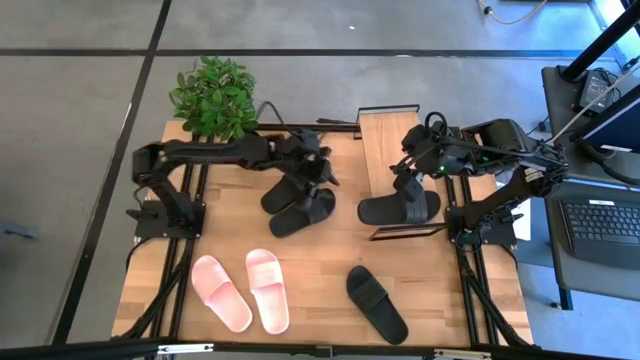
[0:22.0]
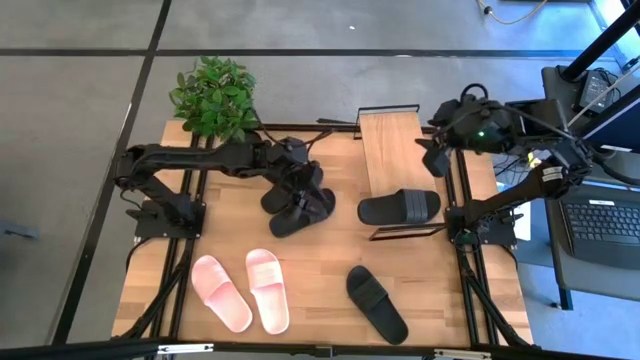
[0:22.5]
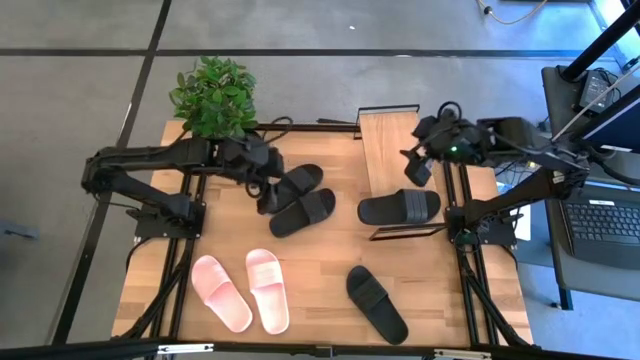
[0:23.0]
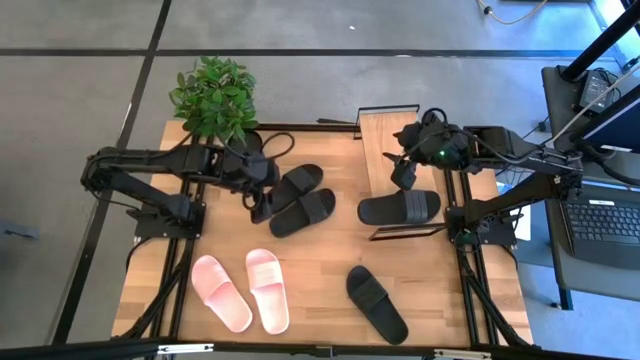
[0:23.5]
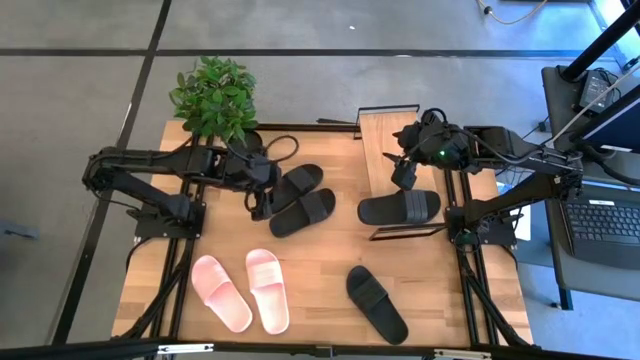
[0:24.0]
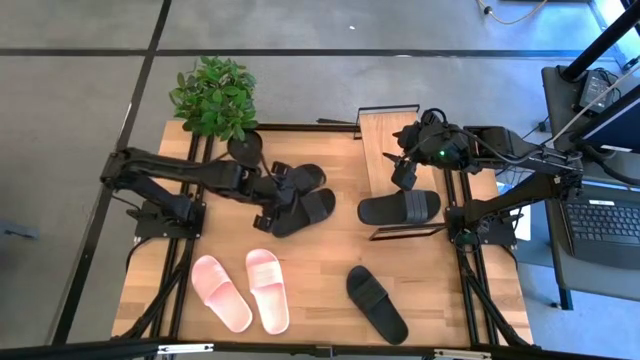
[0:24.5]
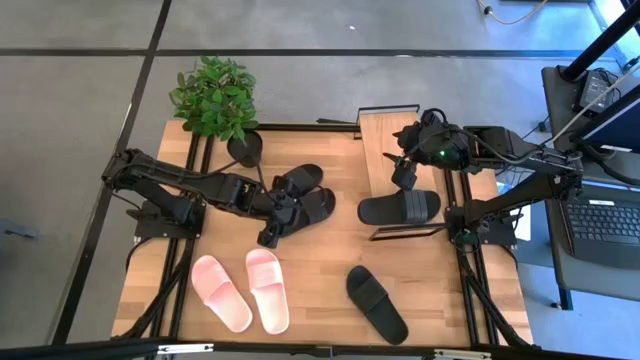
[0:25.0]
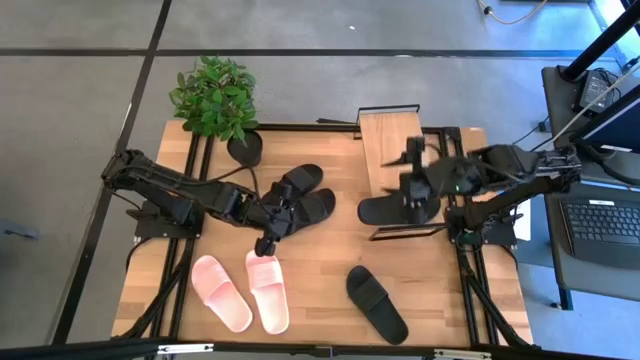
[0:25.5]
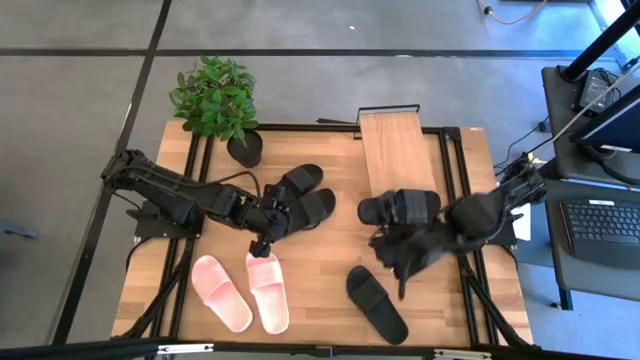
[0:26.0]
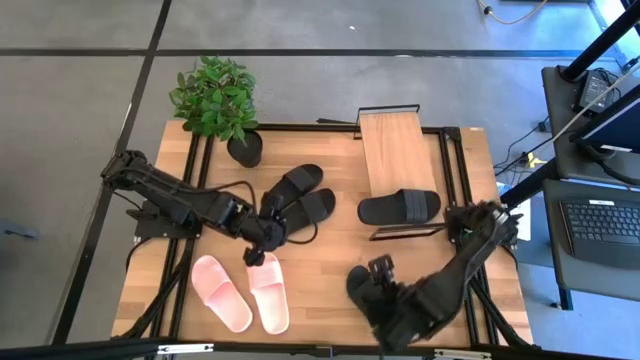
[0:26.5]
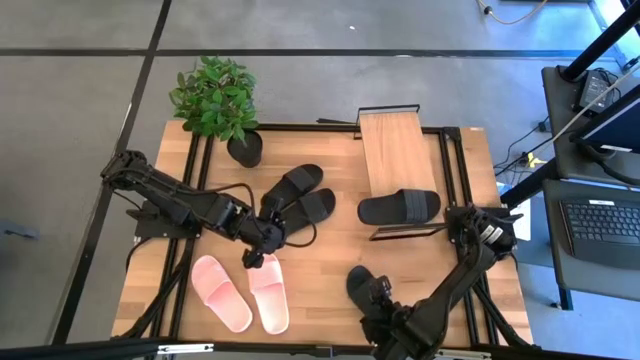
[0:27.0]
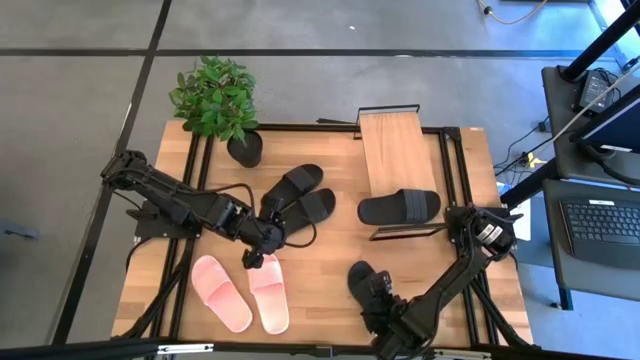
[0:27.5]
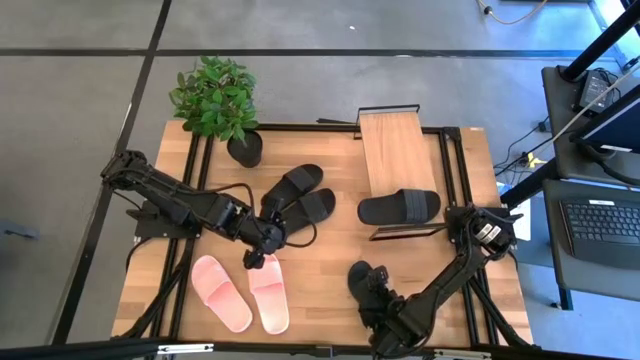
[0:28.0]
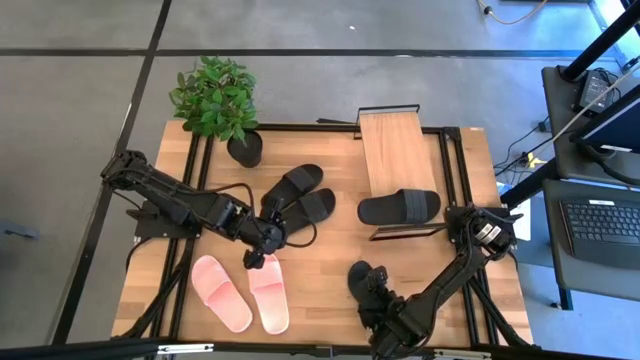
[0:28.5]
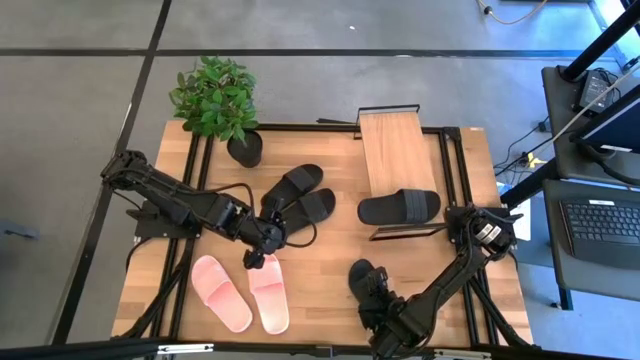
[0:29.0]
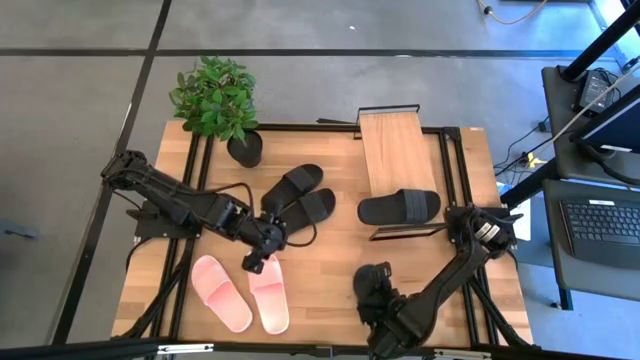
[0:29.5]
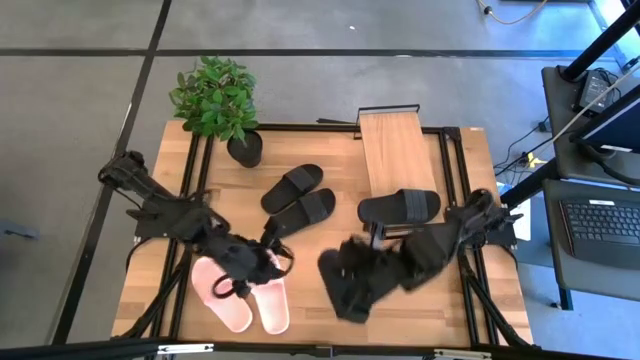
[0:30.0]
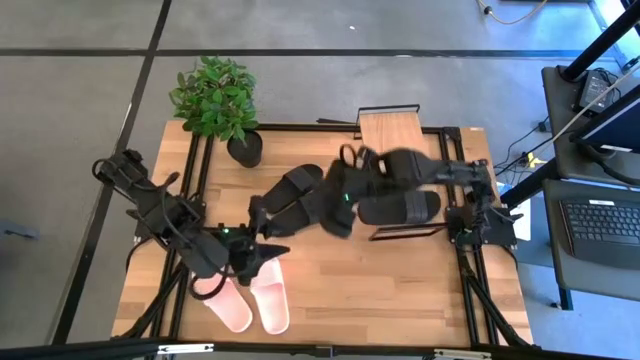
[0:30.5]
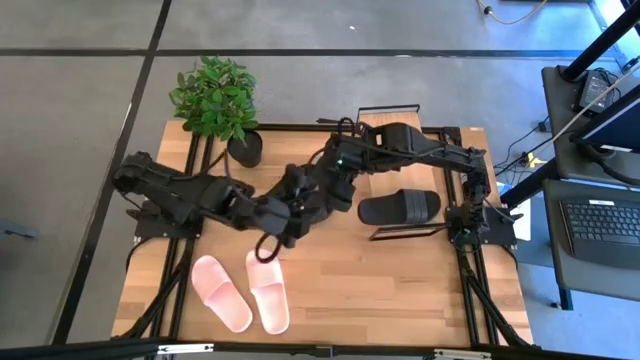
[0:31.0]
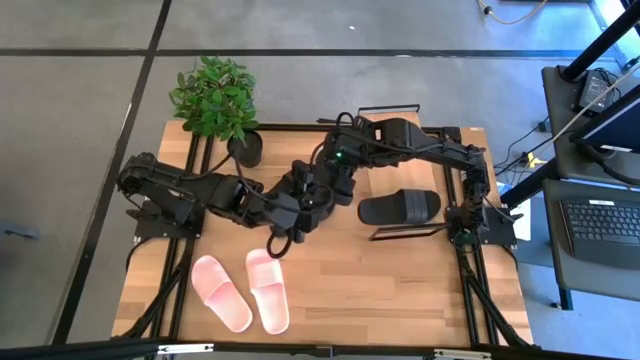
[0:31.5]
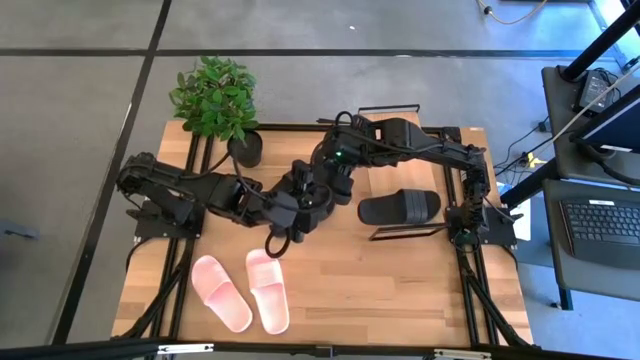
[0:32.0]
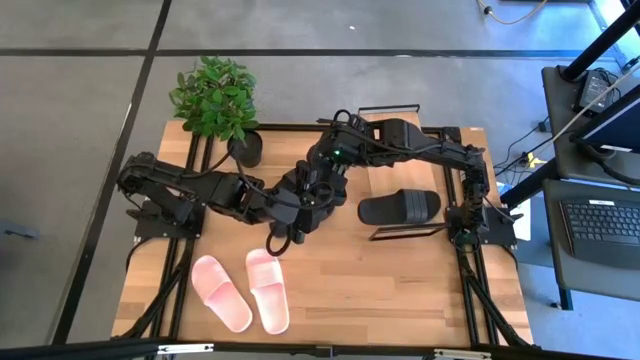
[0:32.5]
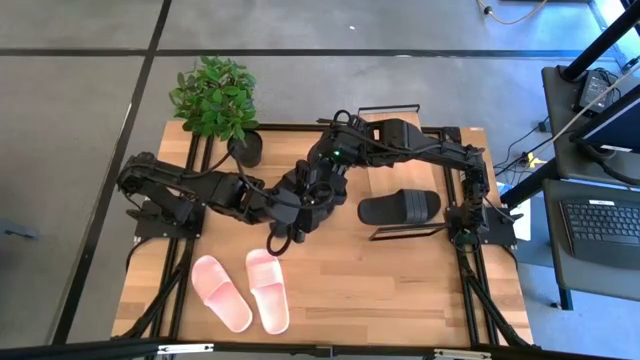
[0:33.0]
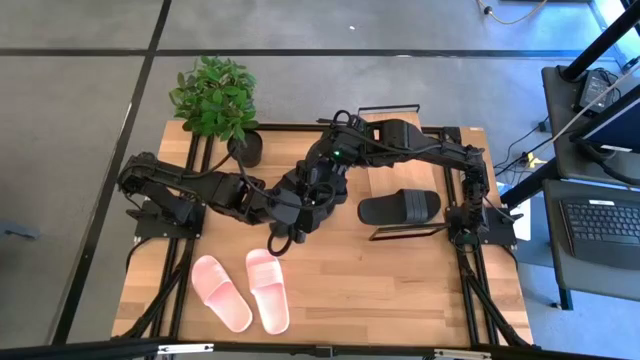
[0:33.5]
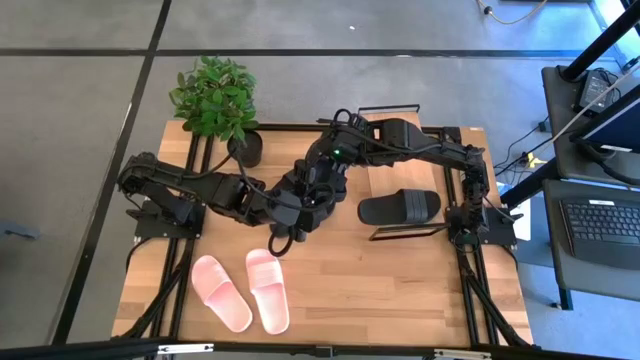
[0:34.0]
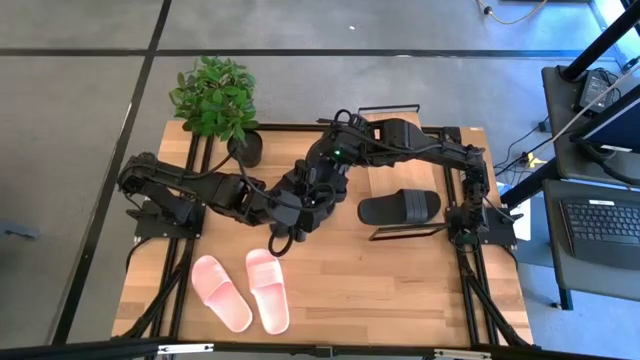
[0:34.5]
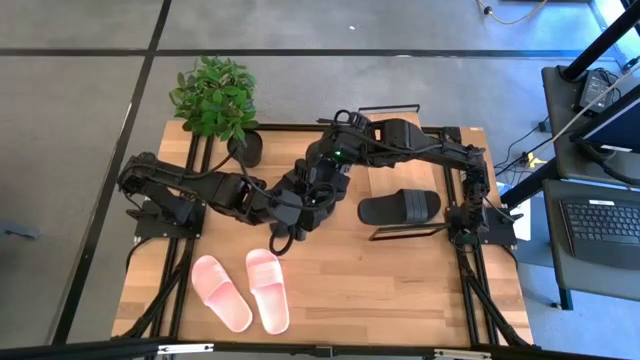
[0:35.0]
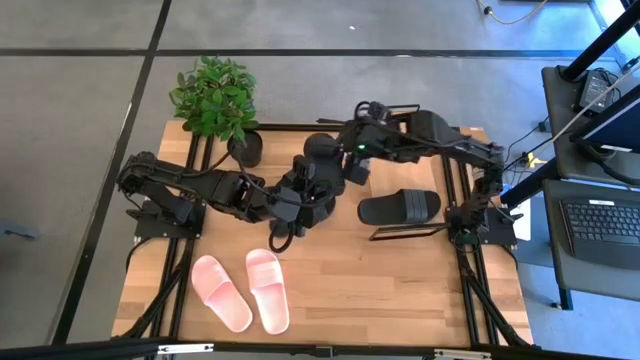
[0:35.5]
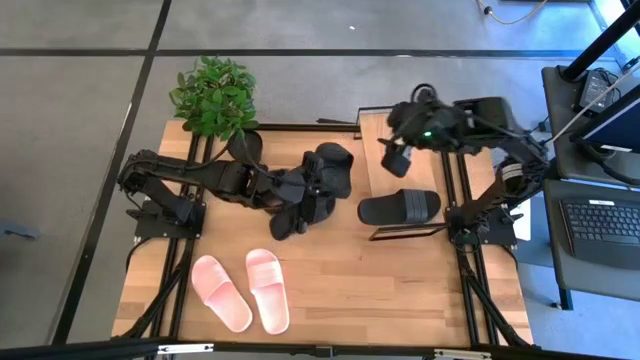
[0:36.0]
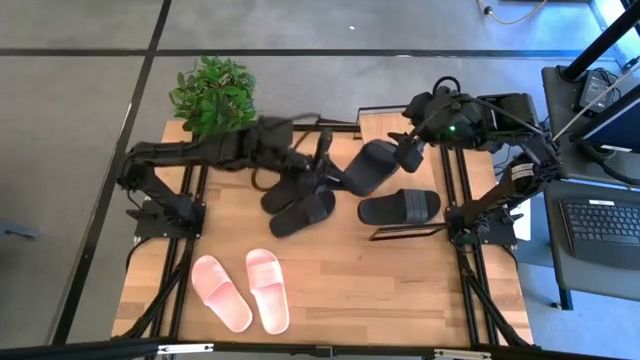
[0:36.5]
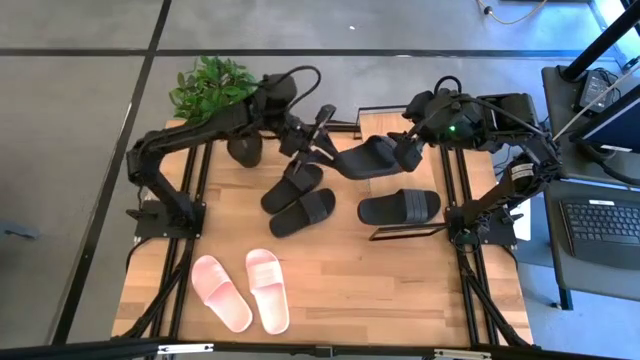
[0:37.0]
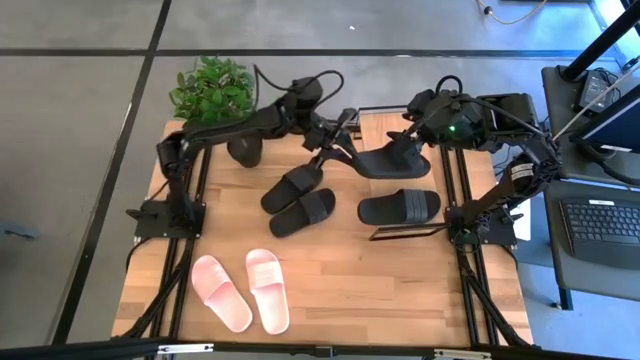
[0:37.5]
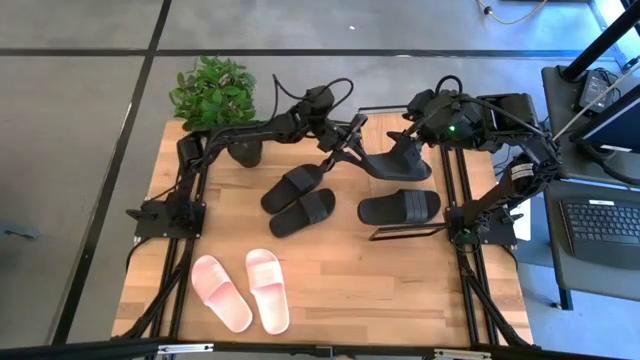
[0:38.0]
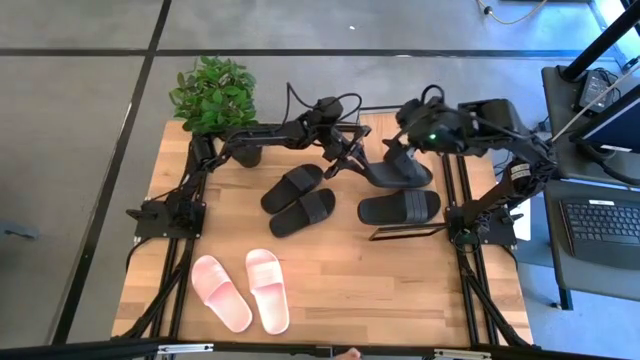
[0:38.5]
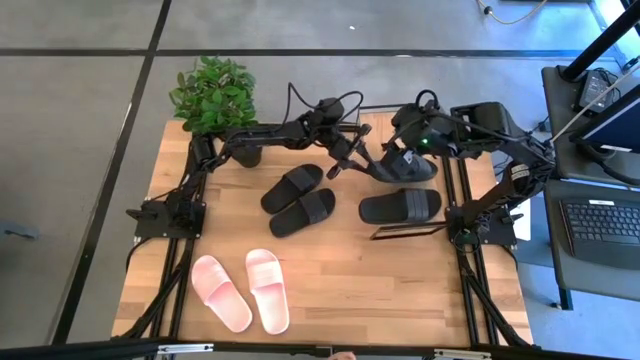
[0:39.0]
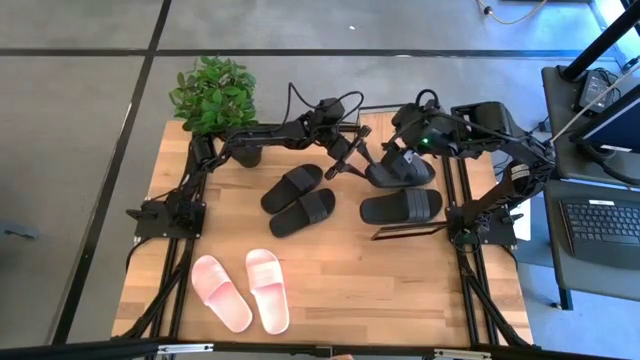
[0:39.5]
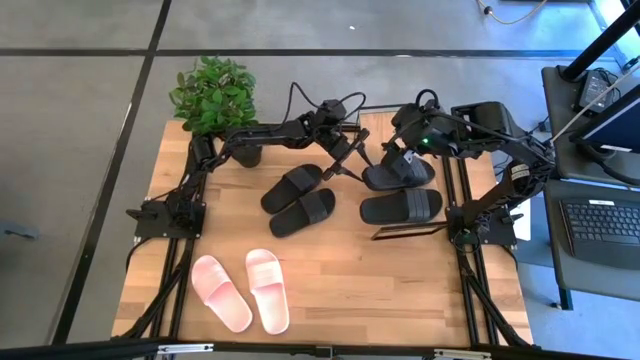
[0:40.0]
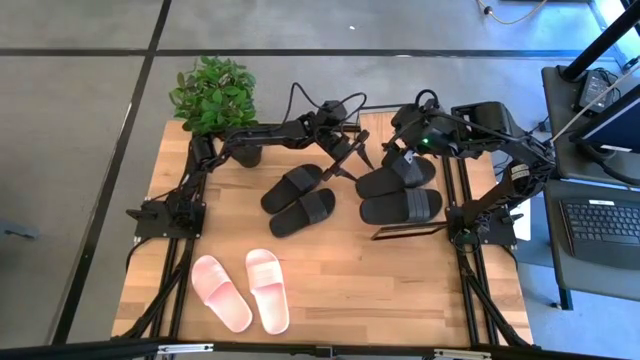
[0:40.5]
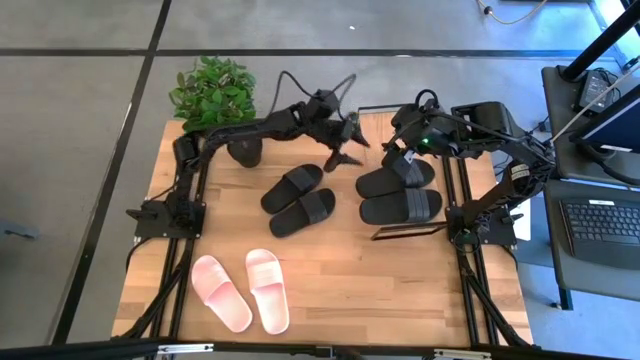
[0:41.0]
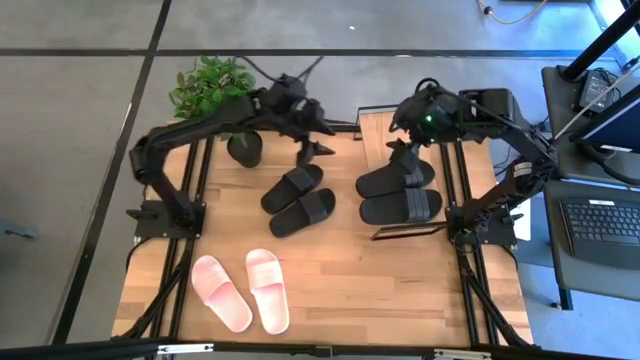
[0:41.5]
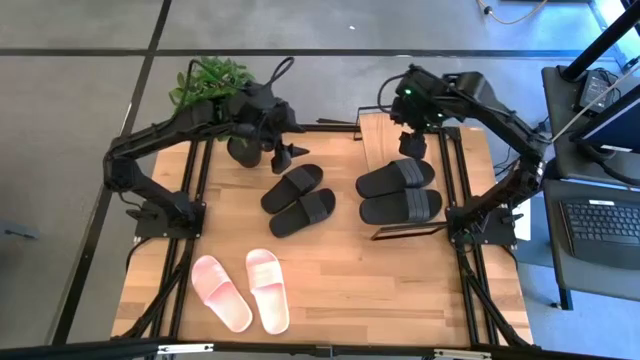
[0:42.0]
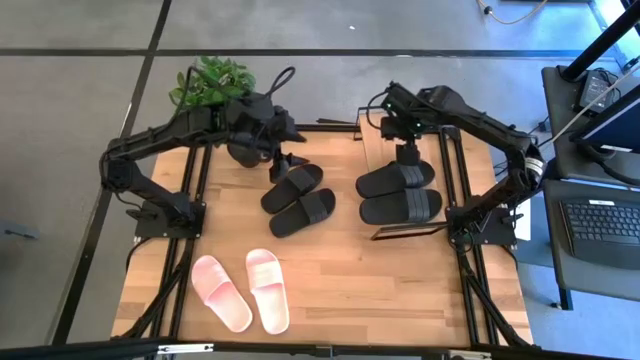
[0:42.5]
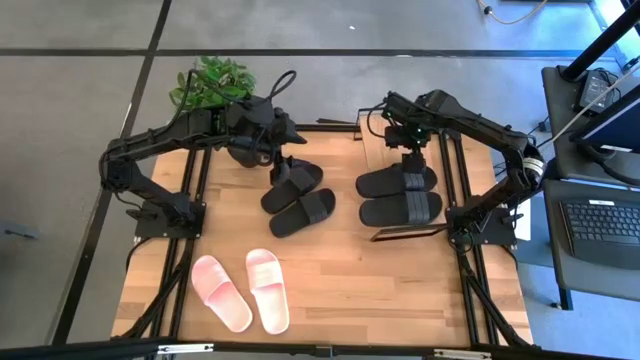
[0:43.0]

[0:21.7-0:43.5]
Task: Pick and place slides into the shelf
Put the black slide on the shelf
